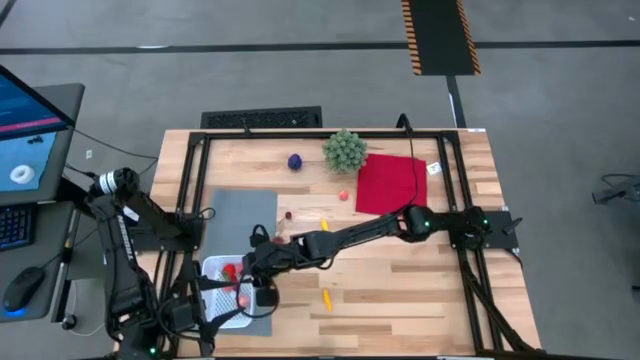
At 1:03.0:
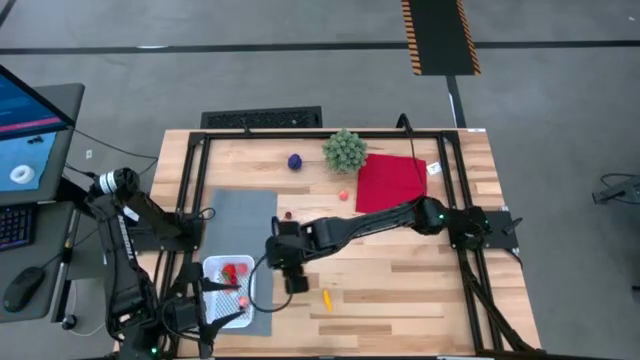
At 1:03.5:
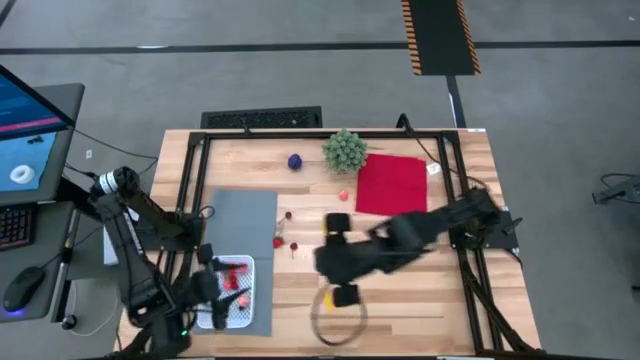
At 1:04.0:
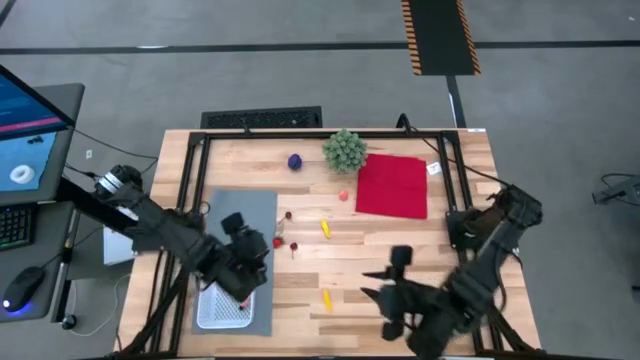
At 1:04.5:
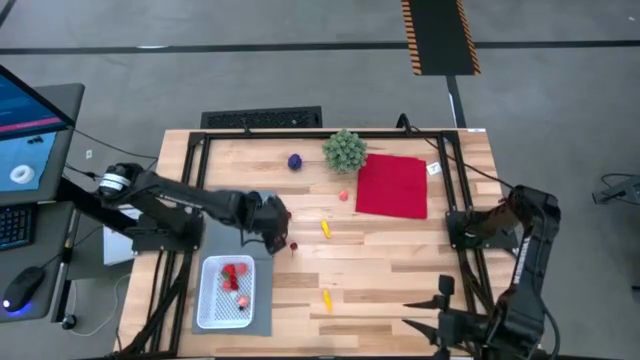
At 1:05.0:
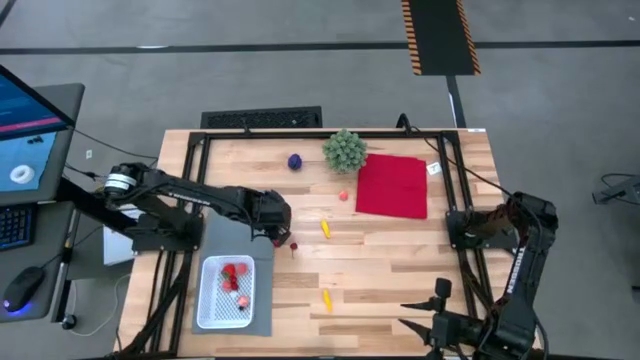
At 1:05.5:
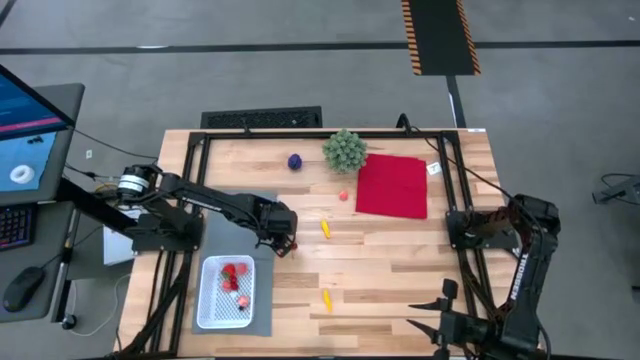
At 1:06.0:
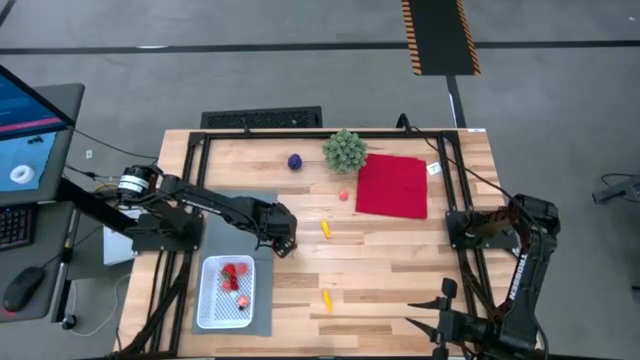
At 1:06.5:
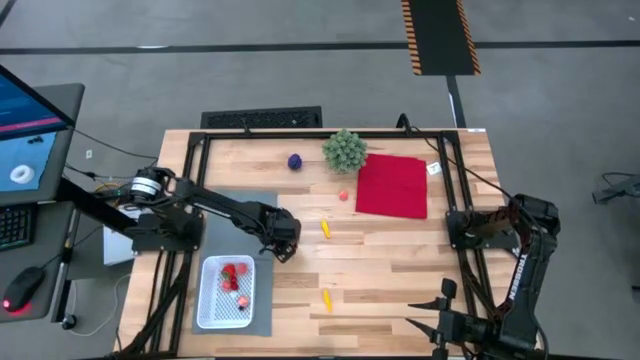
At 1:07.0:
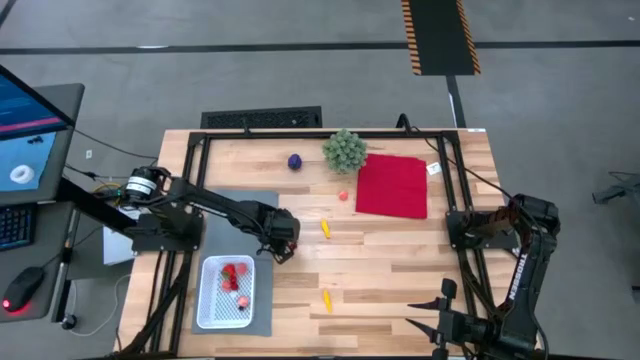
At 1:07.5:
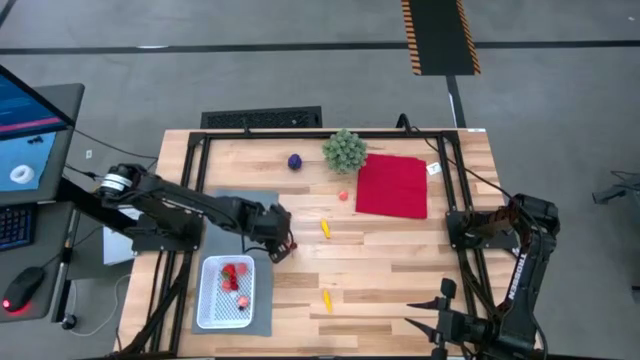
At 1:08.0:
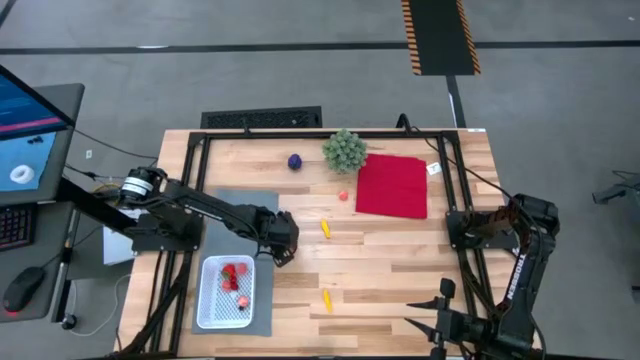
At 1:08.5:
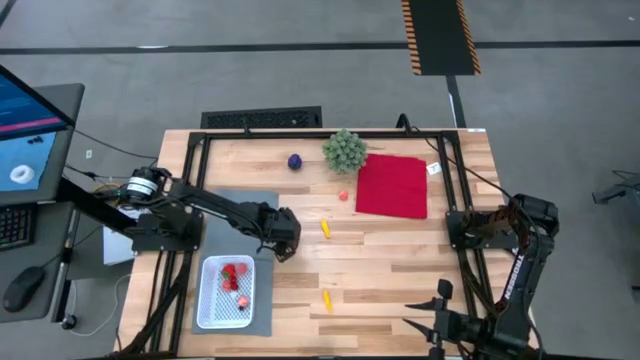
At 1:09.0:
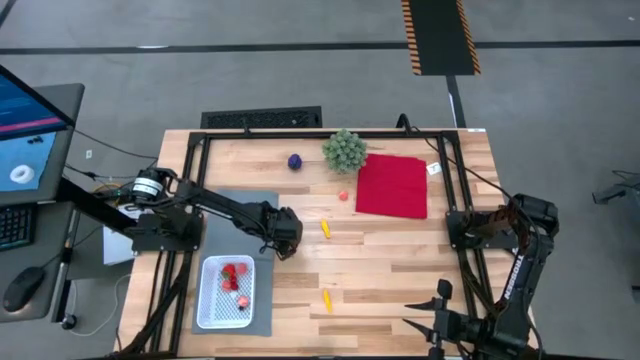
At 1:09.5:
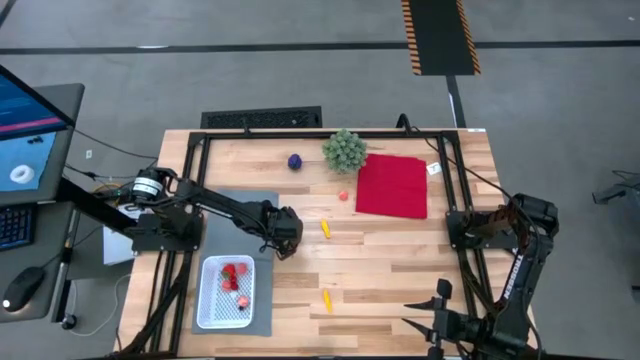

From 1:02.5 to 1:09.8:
Task: Pick and placing Produce into tupperware
Put the red strawberry into the white basket

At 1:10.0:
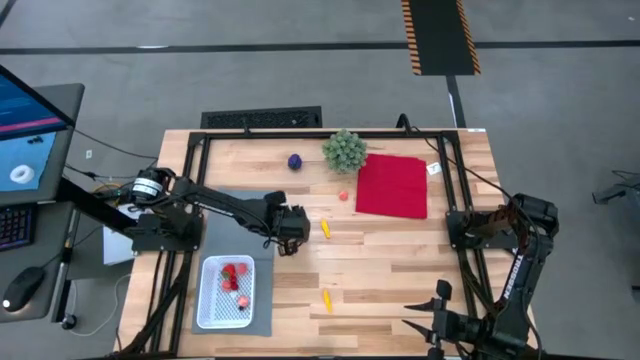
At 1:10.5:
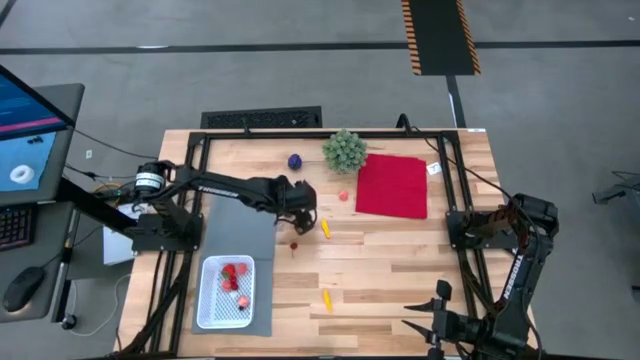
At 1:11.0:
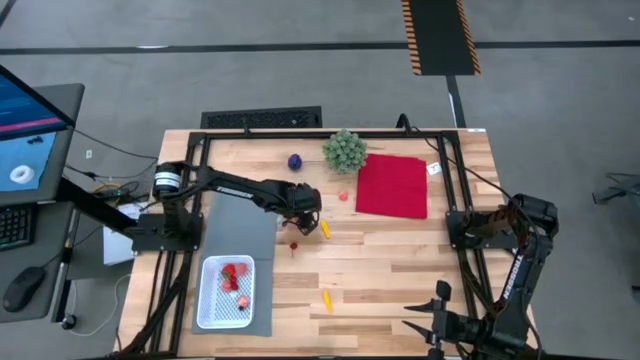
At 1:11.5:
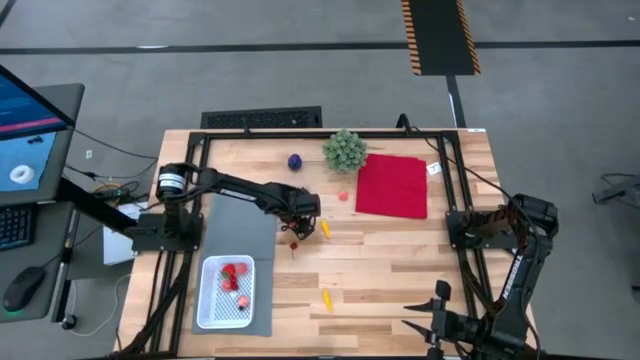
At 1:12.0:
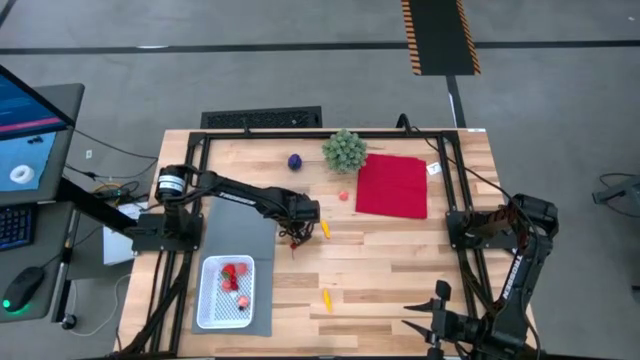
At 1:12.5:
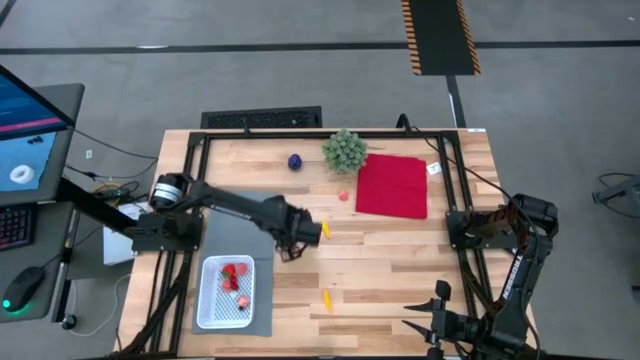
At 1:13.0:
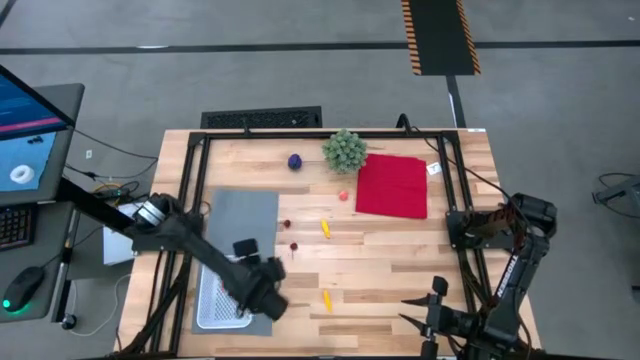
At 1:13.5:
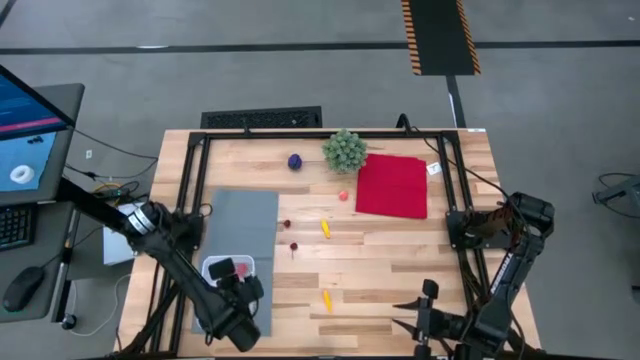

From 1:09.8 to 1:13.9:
Put the red strawberry into the white basket

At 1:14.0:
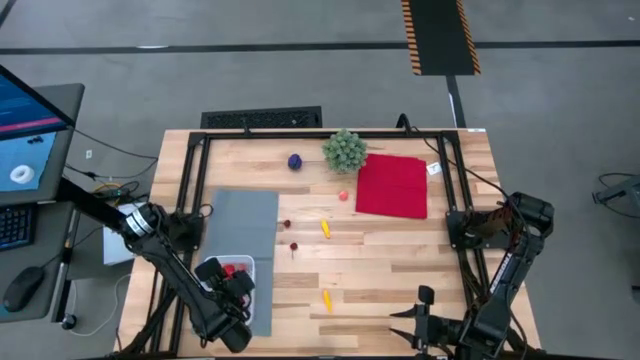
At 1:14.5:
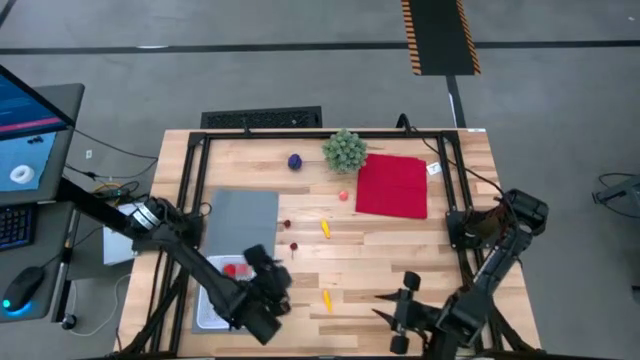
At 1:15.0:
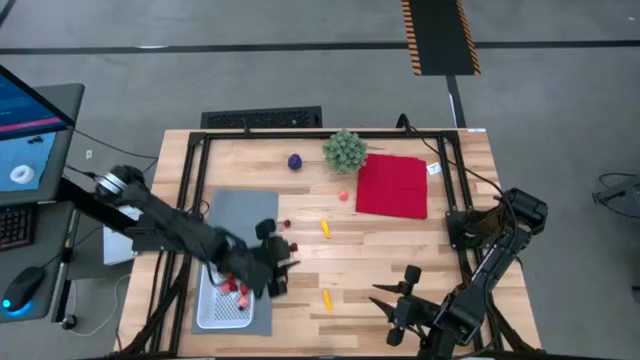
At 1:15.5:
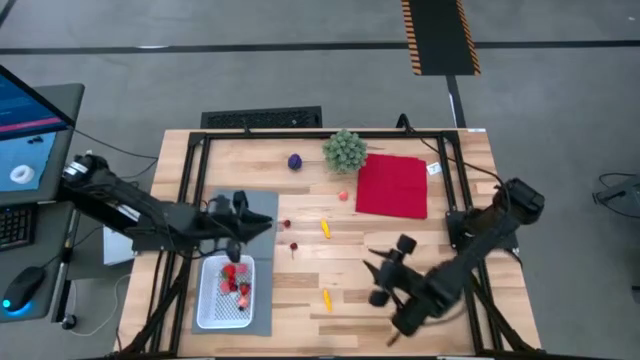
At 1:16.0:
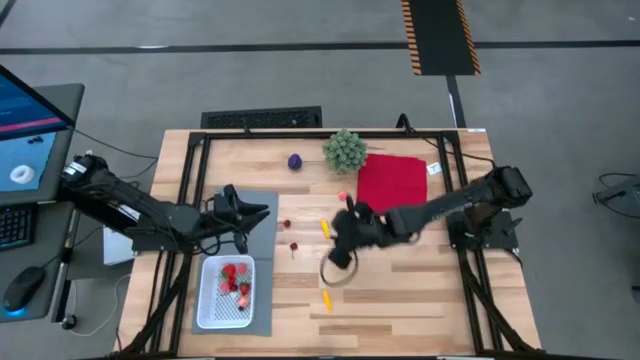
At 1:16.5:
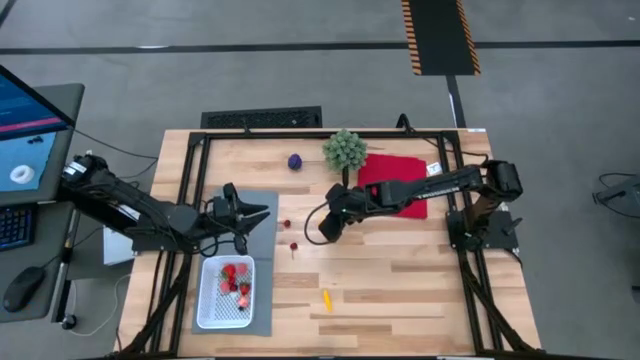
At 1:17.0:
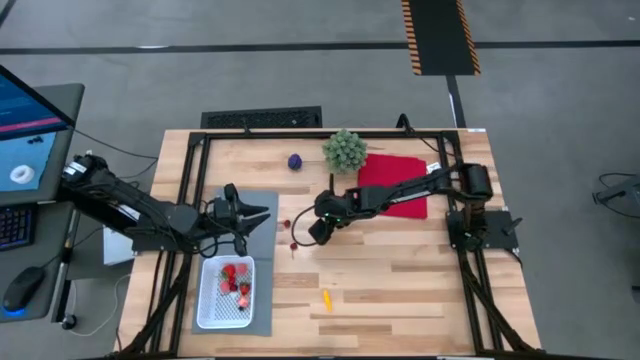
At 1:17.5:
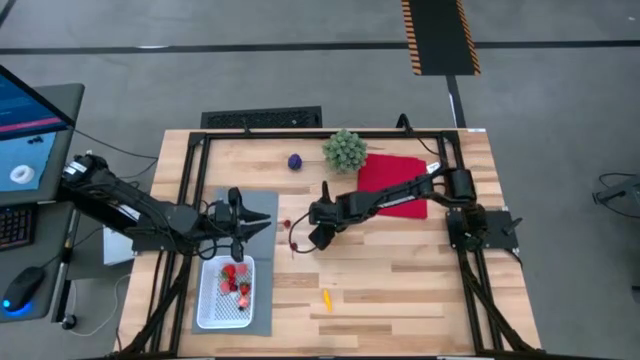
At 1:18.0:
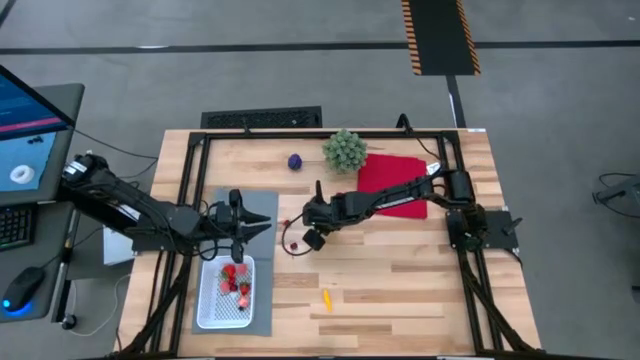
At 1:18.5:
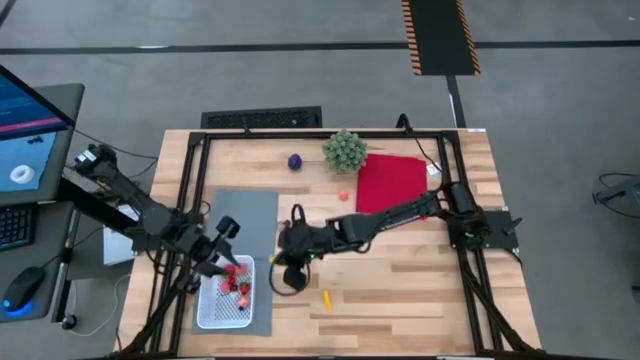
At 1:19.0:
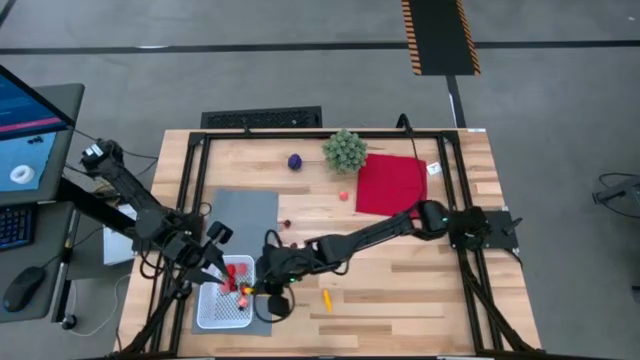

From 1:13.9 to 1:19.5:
Put the yellow corn into the white basket

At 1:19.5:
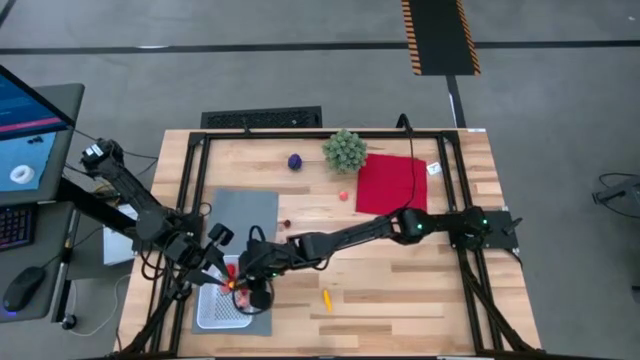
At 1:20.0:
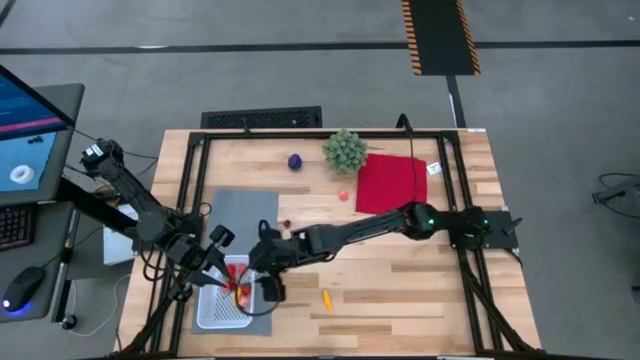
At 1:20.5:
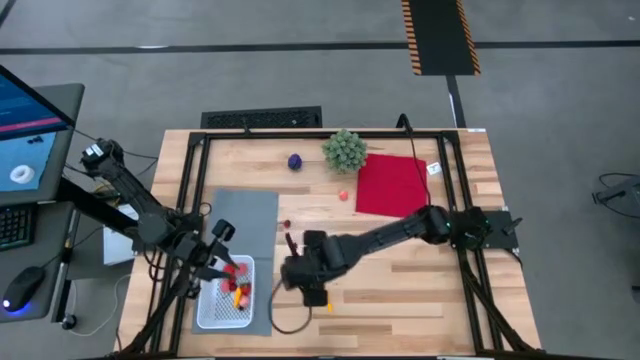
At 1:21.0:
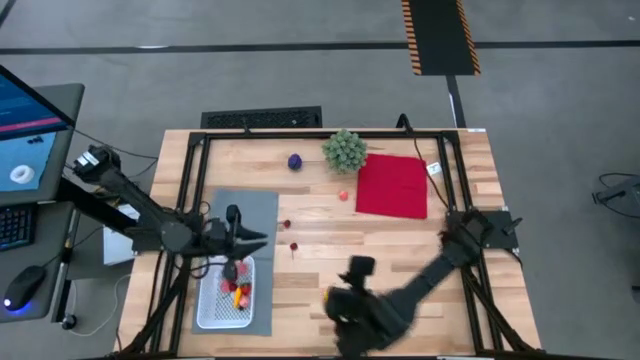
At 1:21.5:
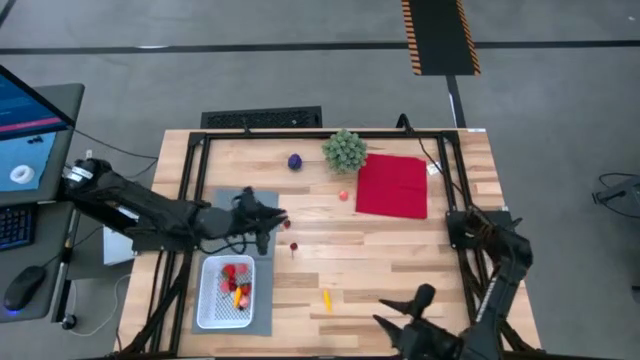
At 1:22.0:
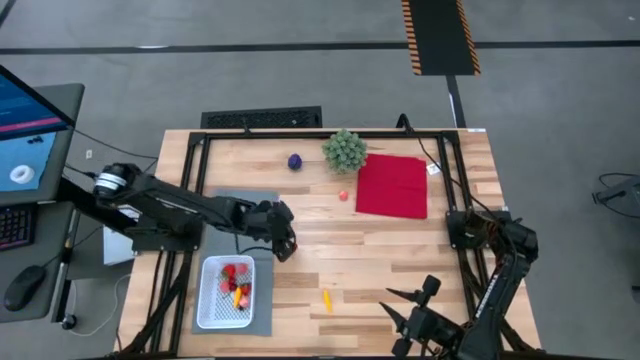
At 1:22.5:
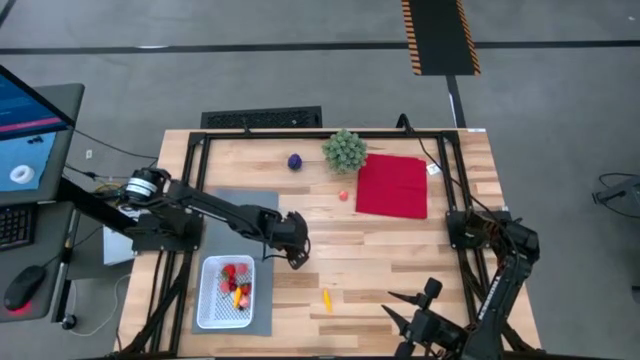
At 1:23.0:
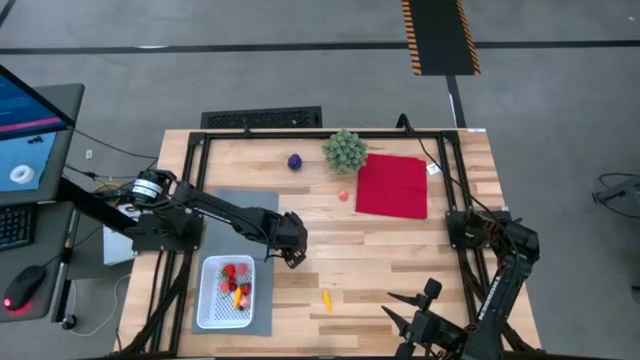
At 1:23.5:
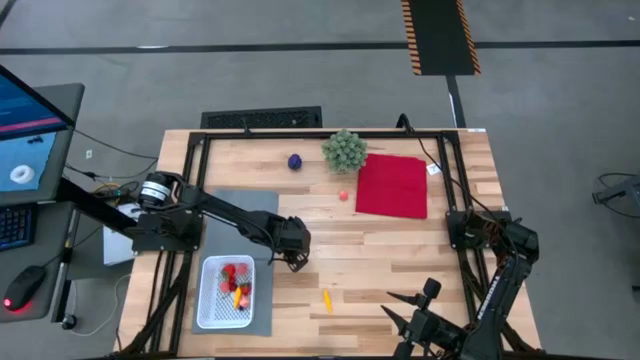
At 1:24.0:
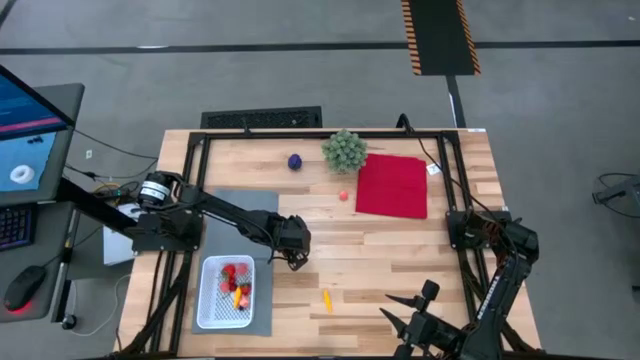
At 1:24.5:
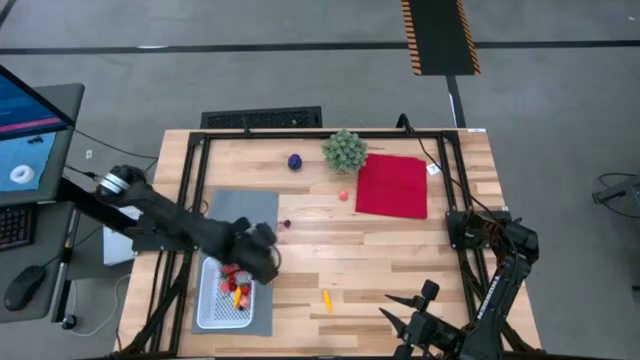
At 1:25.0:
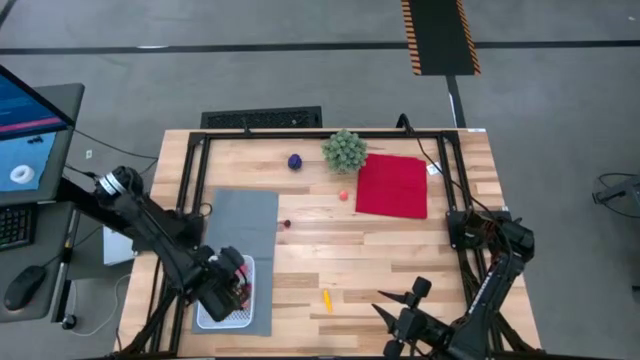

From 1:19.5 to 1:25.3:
Put the red cherry into the white basket
